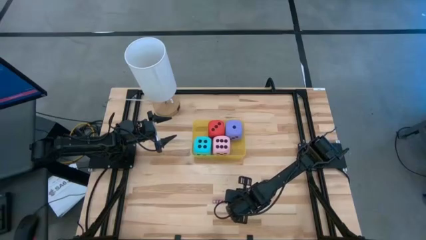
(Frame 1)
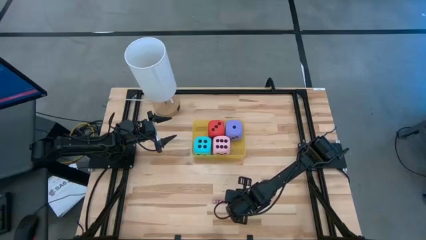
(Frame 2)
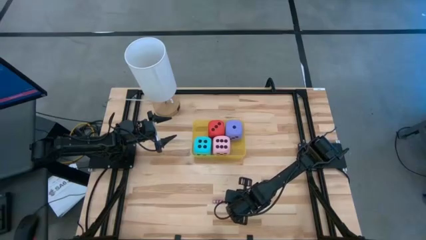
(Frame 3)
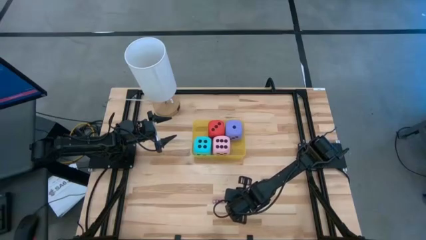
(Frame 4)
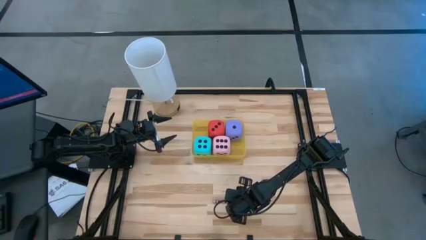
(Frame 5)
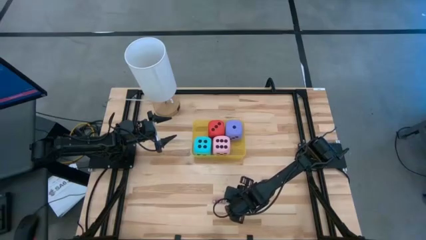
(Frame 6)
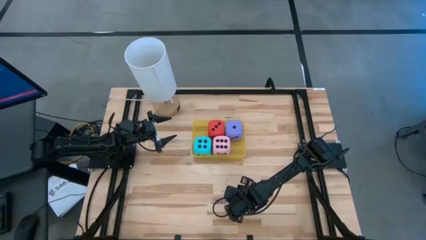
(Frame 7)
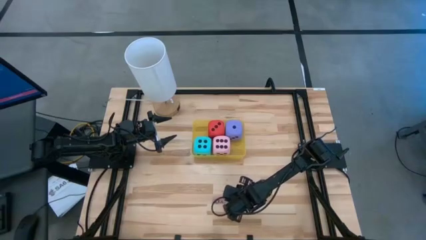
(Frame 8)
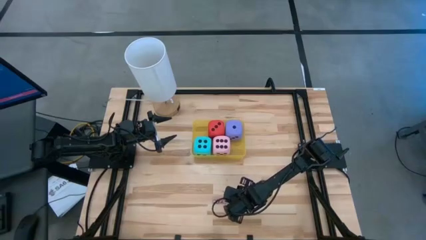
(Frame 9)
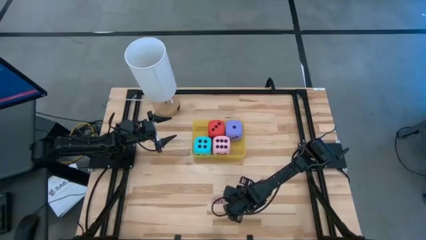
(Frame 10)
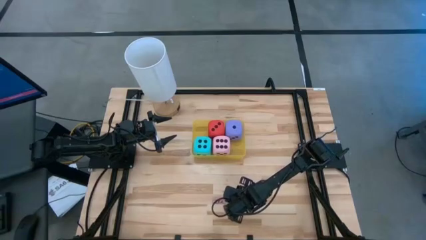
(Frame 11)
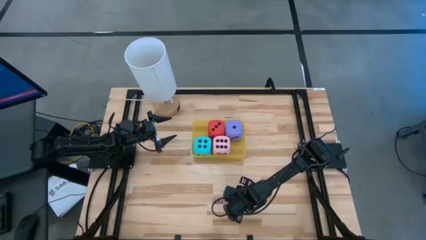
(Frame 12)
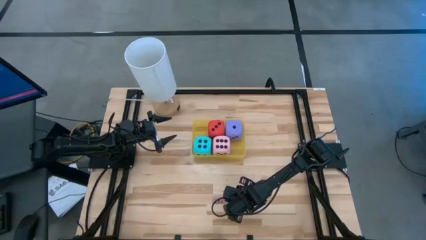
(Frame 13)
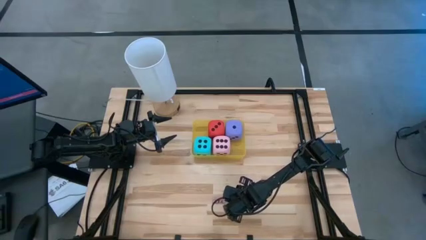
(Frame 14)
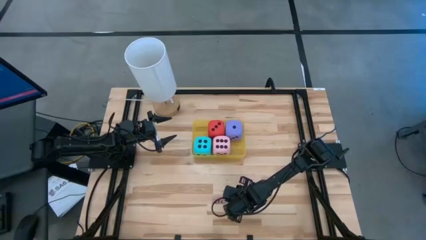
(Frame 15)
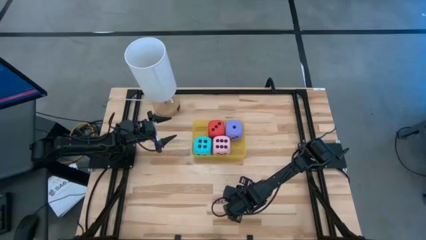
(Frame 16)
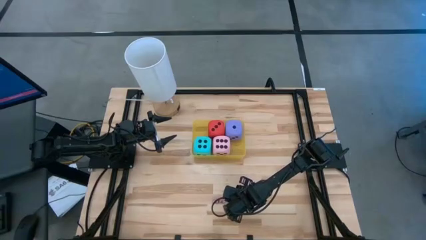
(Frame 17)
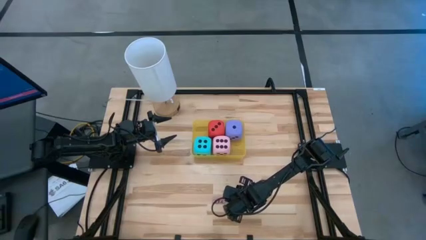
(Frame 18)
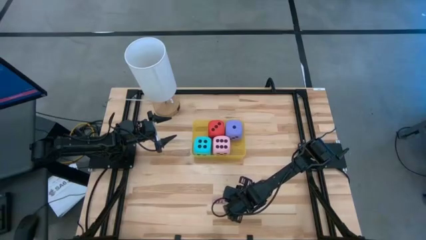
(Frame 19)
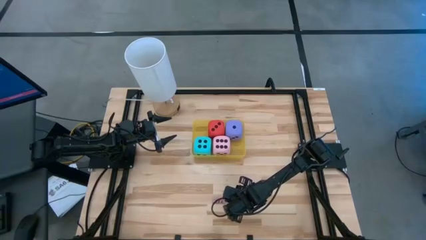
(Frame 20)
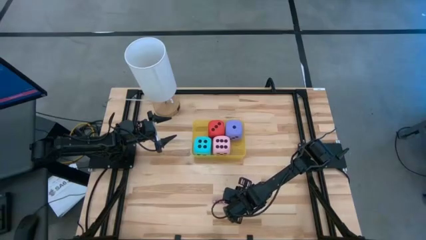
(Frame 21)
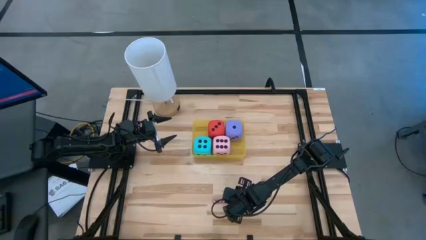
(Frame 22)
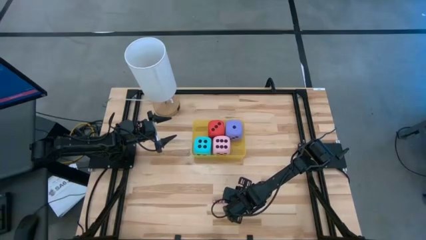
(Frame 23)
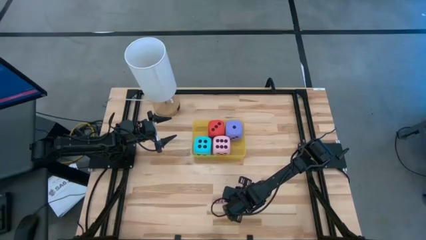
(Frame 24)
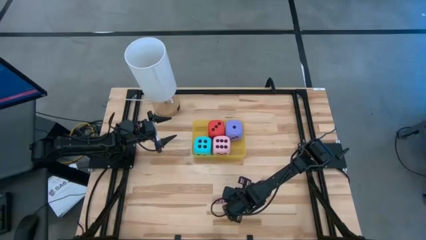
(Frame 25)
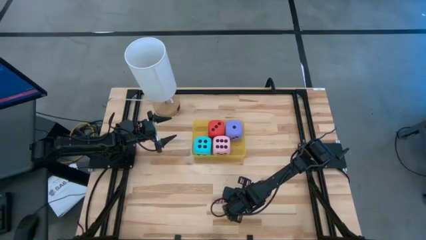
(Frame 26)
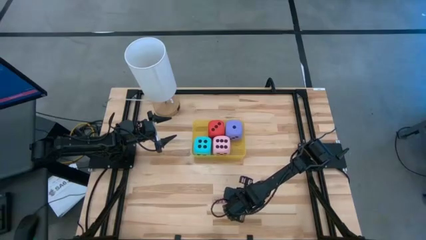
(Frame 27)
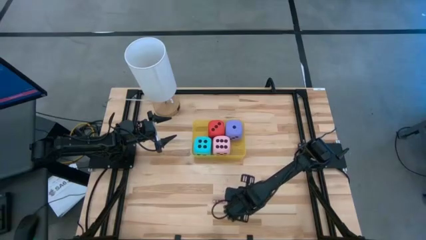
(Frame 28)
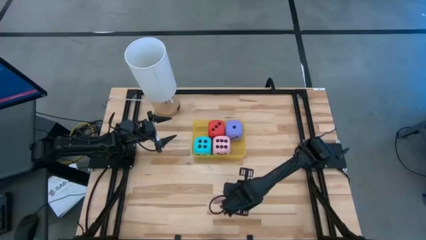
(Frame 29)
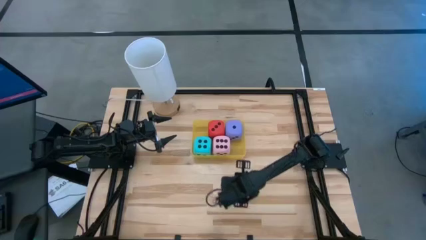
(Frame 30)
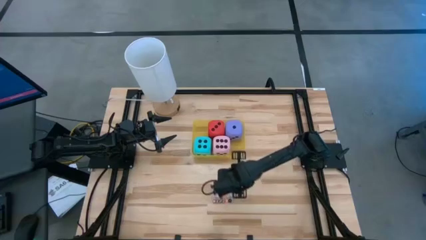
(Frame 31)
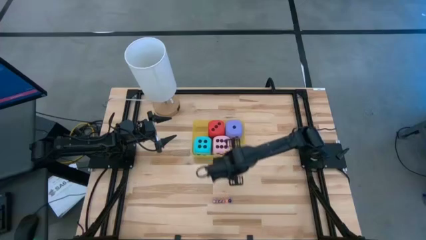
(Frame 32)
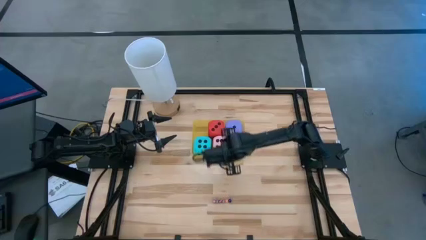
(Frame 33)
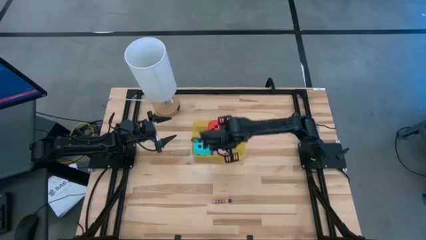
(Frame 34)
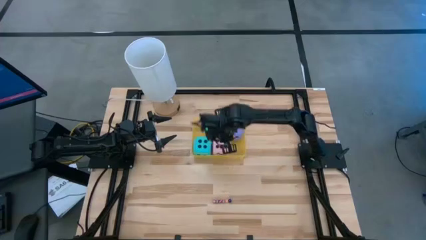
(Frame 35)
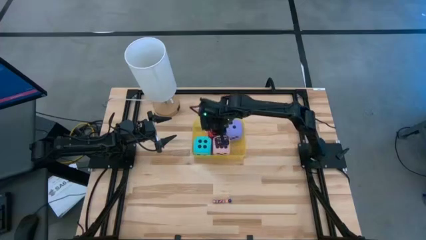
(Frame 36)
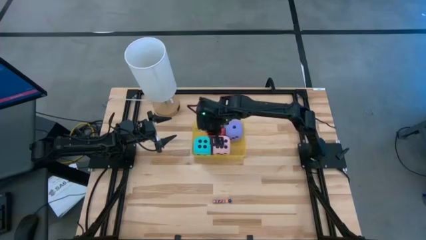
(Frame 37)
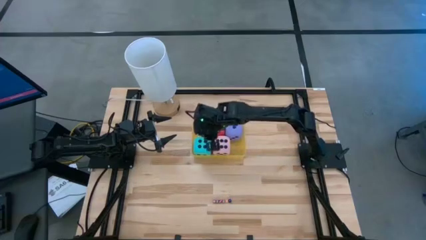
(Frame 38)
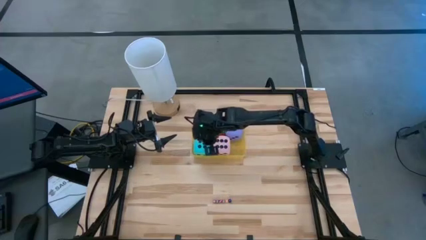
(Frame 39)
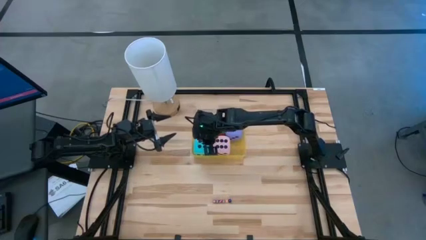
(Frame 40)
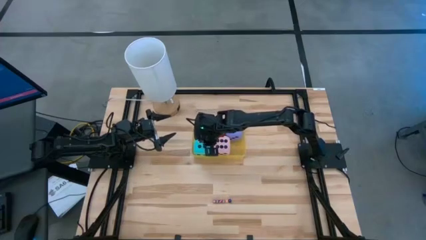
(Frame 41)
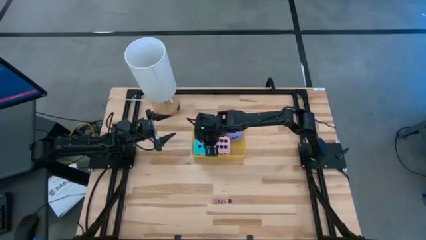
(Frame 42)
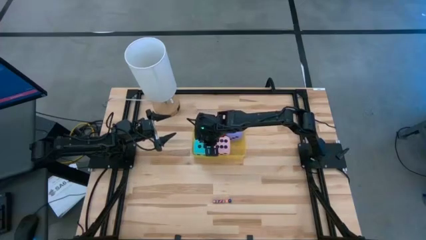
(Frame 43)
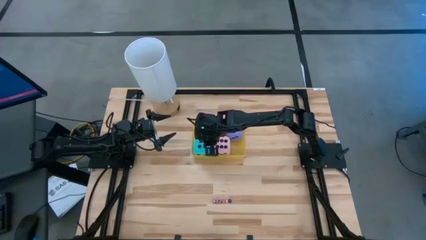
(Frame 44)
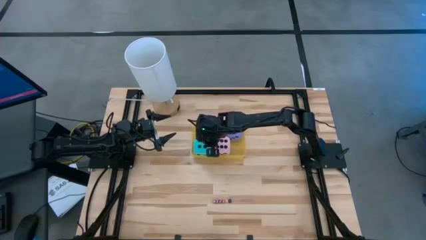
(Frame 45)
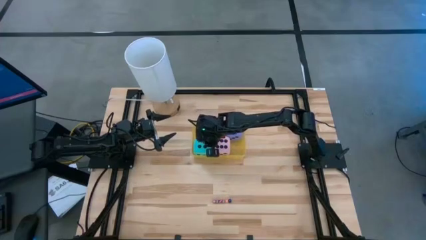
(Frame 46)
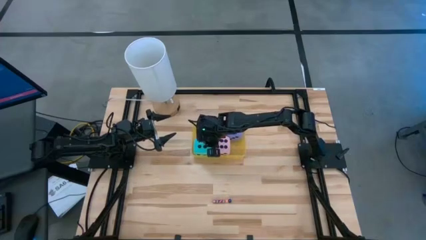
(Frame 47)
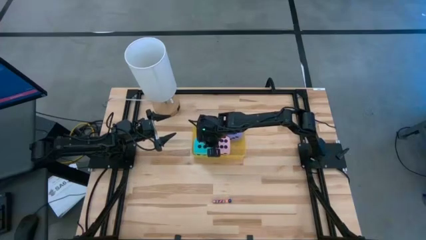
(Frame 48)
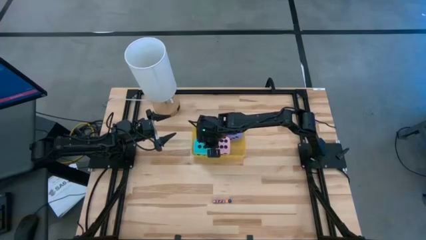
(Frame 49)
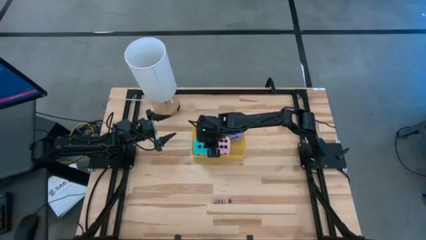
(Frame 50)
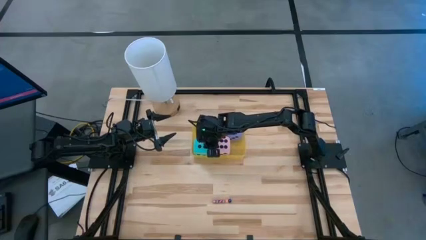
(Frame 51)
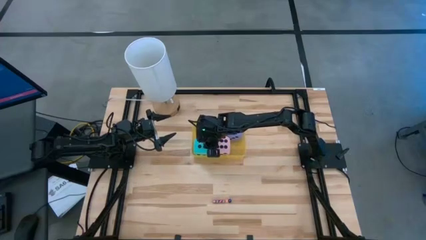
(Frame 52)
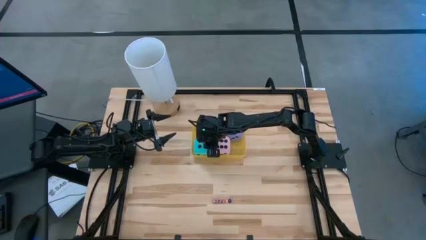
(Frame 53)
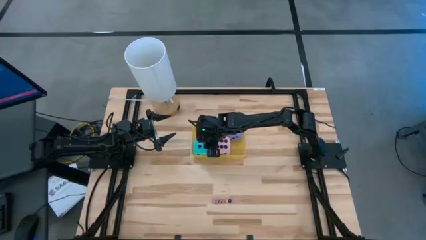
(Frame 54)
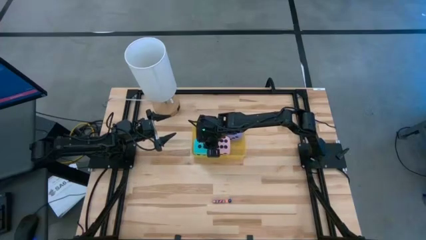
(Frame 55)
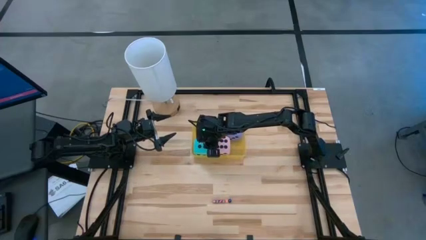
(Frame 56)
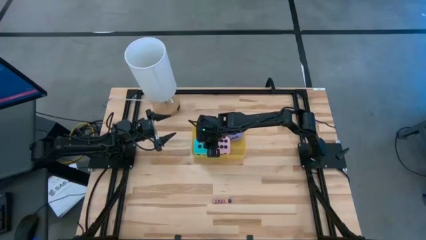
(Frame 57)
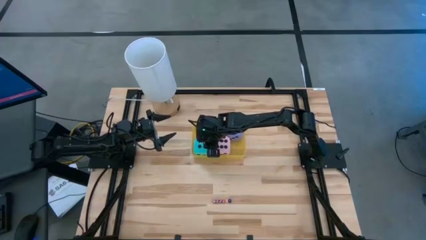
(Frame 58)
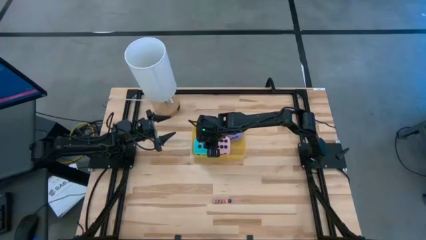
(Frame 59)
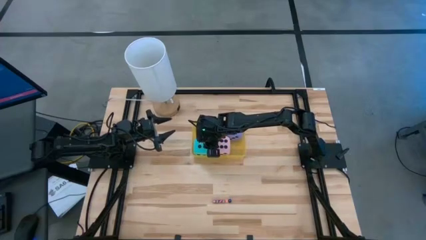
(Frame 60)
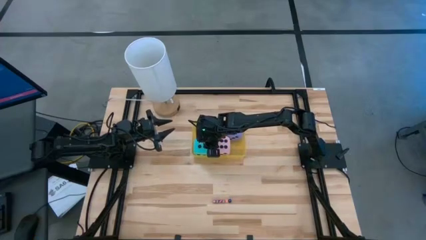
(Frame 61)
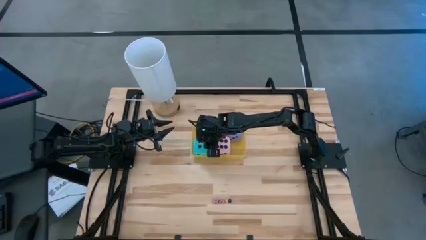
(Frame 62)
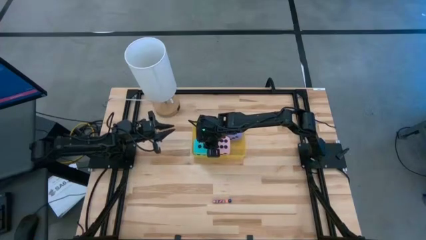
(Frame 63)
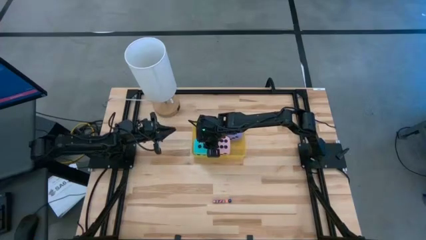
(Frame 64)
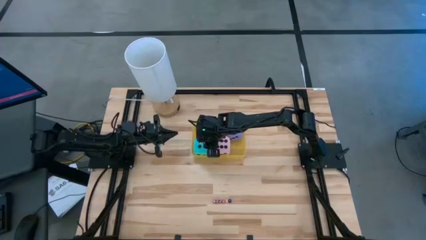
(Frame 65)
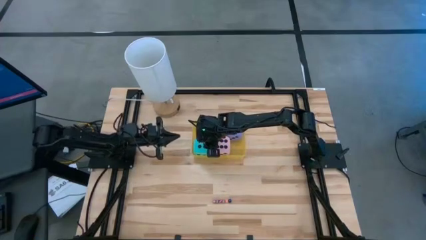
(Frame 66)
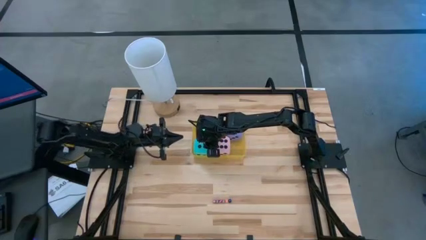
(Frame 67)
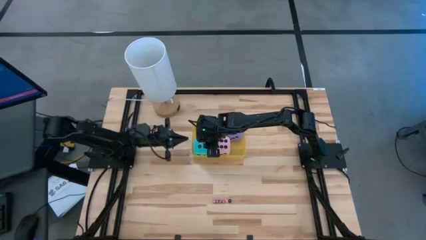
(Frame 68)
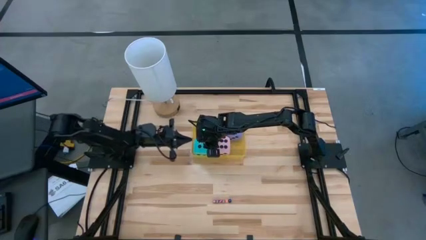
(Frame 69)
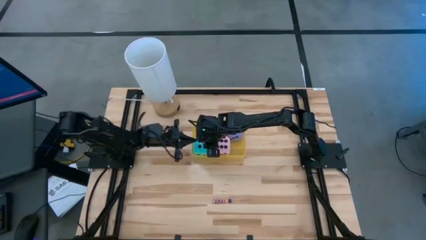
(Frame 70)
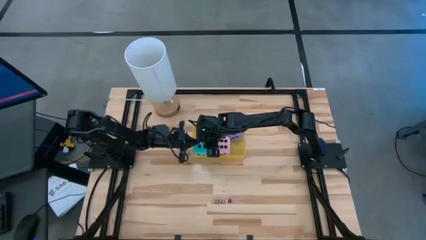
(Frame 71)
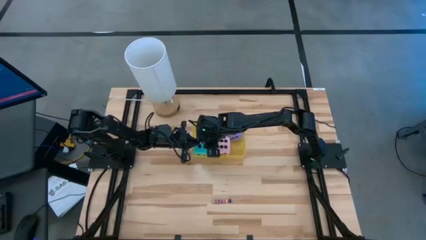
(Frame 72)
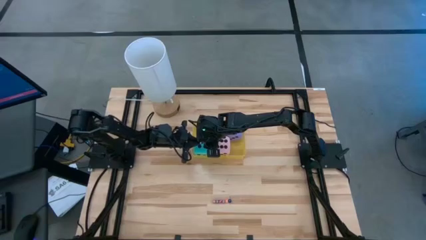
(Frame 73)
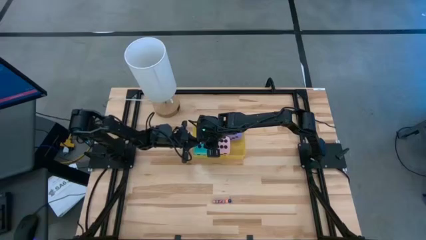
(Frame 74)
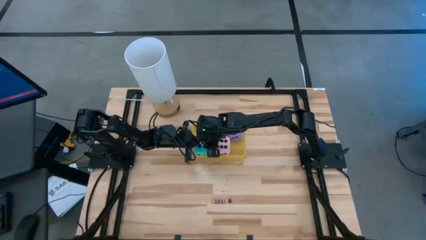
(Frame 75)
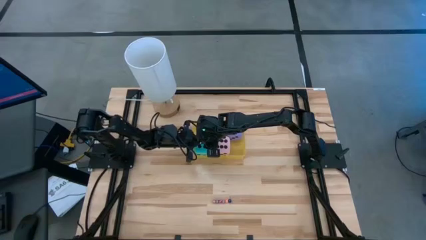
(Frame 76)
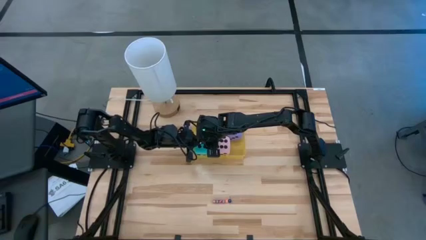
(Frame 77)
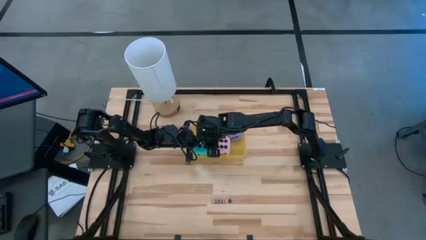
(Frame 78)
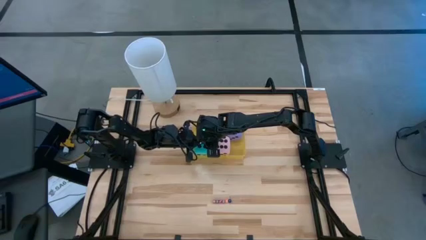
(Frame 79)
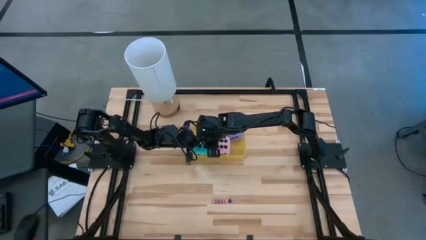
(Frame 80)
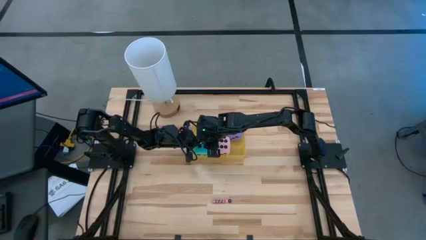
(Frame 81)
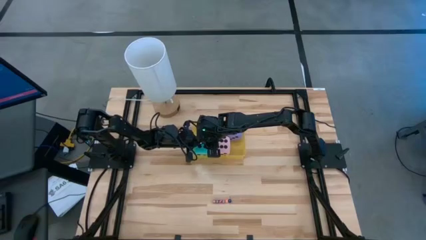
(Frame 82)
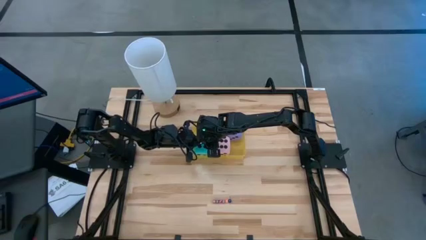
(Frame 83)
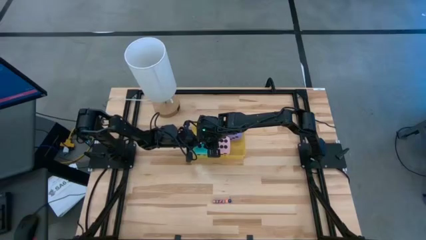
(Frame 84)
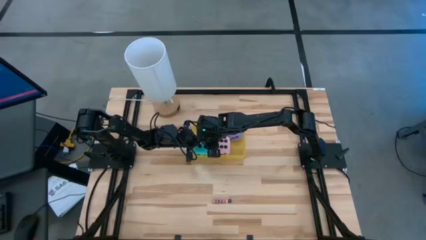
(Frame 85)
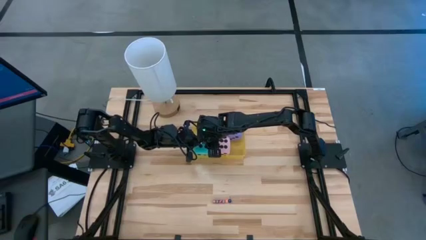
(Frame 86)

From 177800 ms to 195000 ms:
Task: Pick & Place Dice
Put the right small purple dice into the yellow bin
